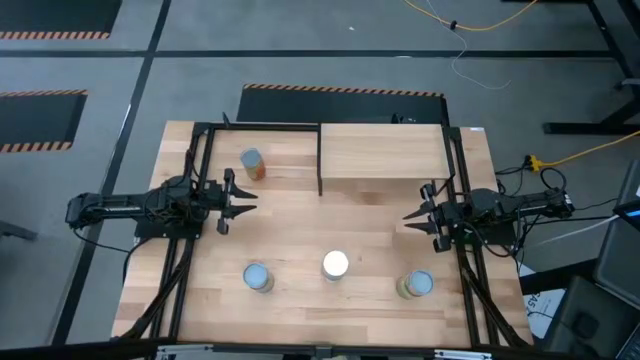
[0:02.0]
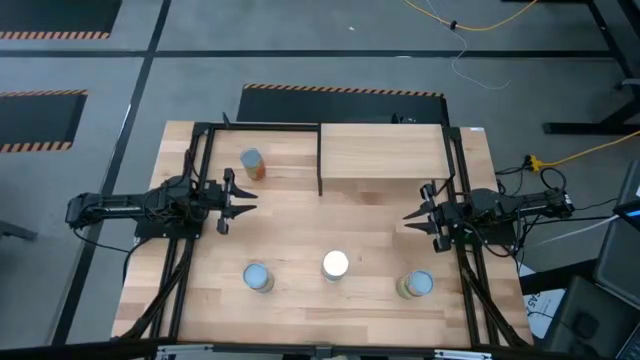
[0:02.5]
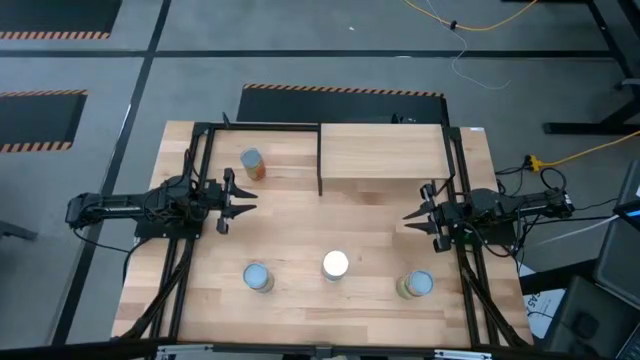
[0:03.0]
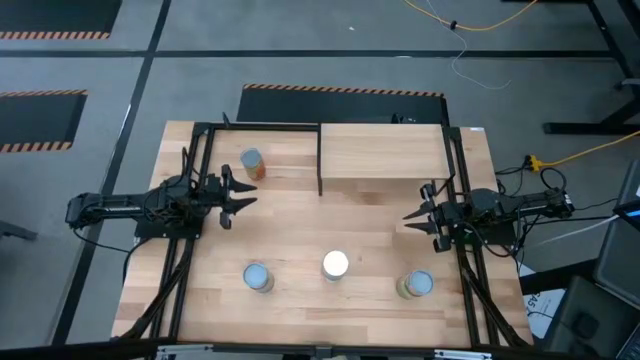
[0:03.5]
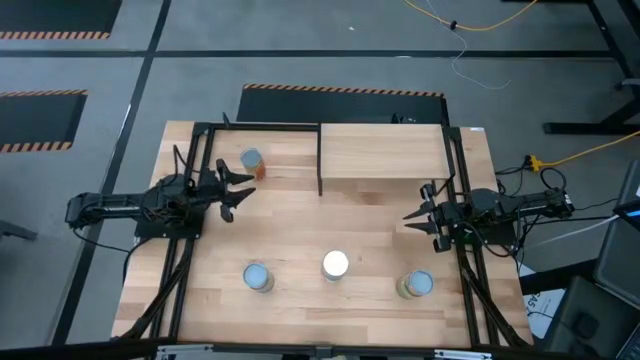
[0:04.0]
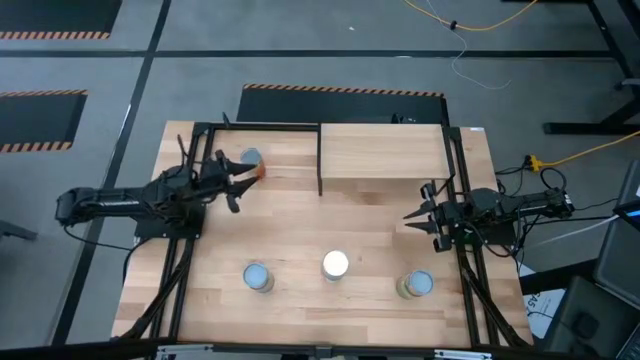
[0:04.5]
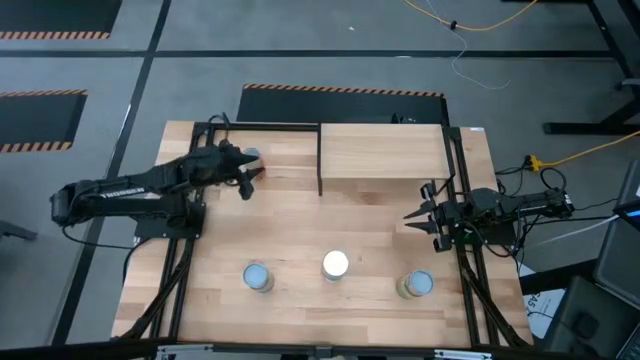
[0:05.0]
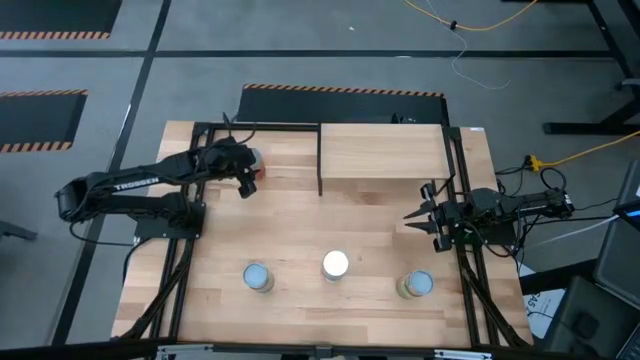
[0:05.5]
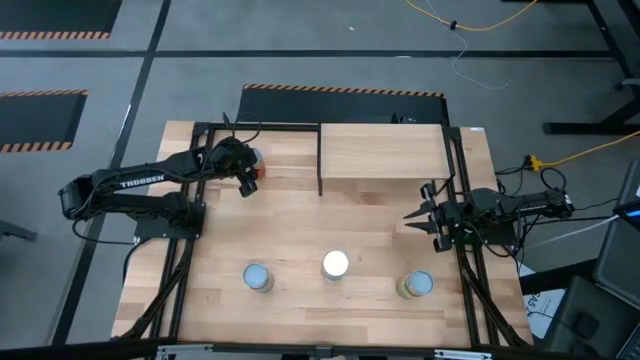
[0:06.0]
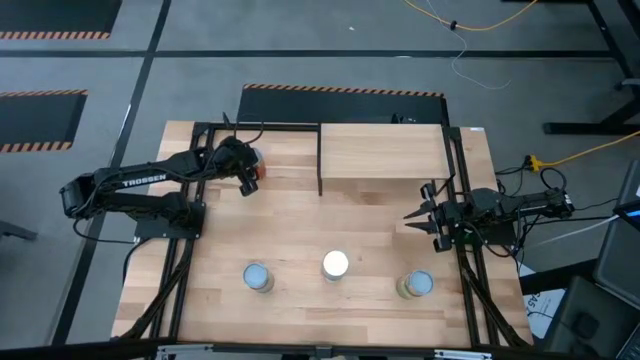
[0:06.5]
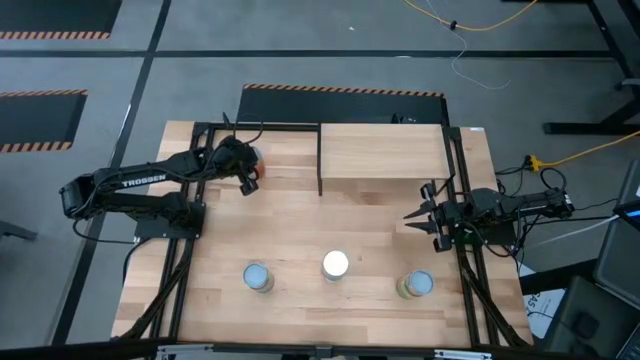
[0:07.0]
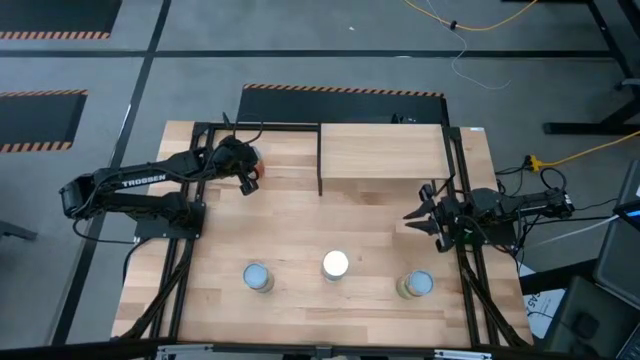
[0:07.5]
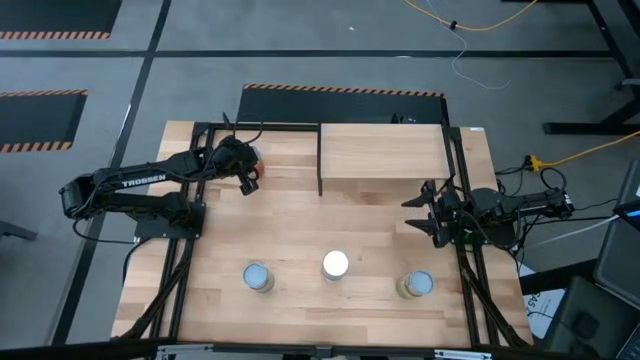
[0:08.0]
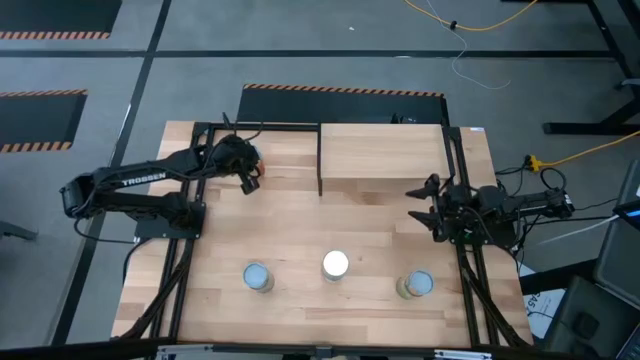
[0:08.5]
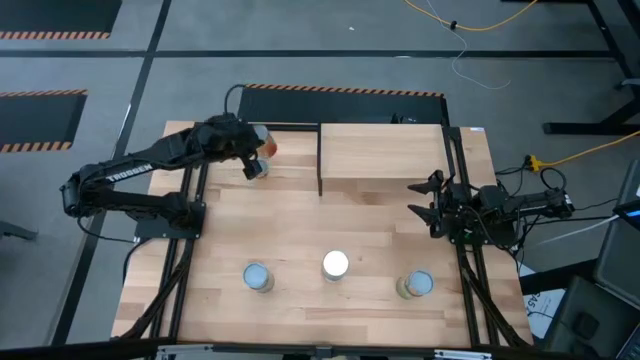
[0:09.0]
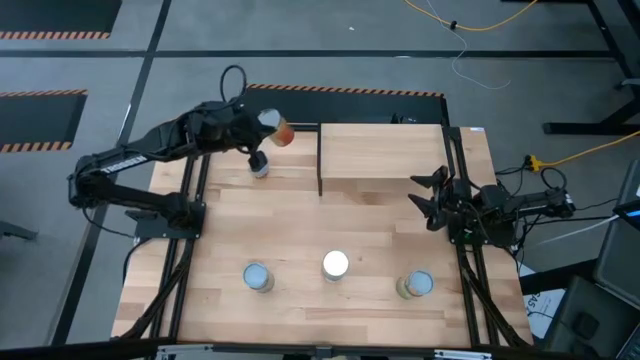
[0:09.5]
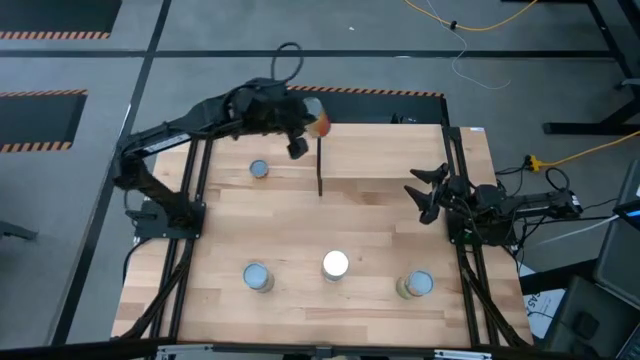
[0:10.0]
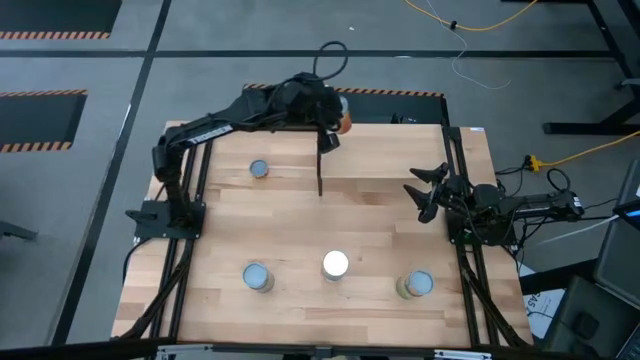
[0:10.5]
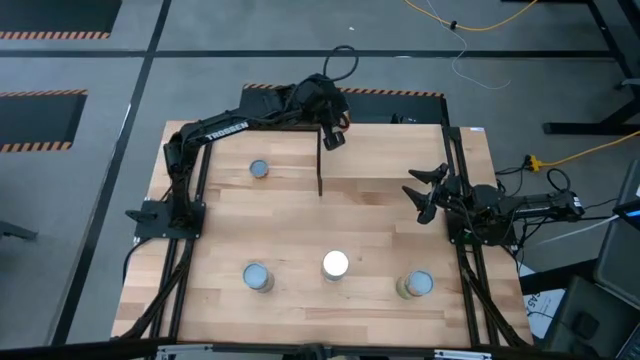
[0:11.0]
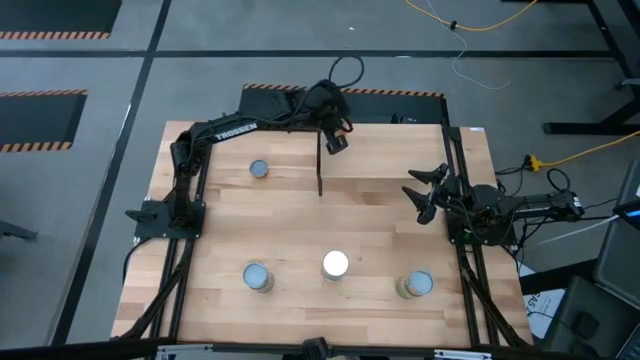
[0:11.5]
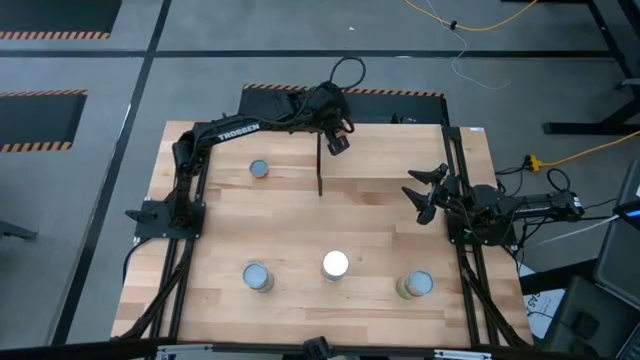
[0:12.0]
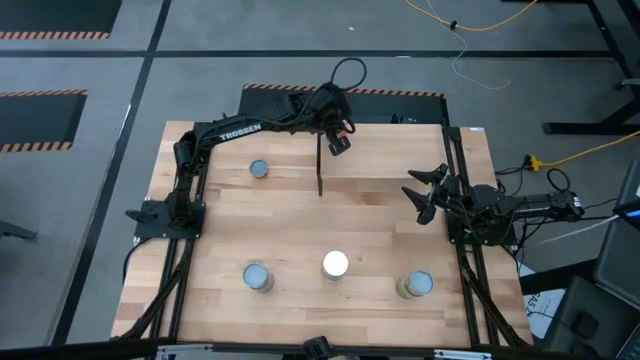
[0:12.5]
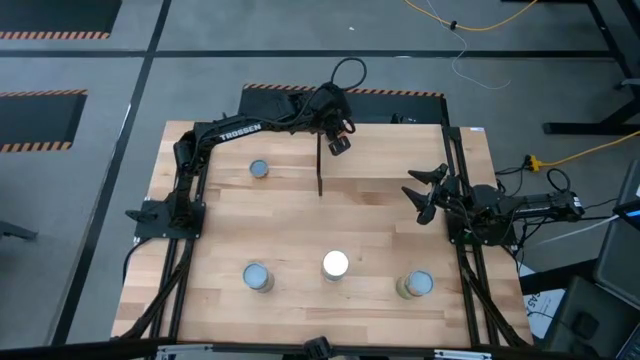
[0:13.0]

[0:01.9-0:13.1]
Task: Pick and place cans onto a shelf
Put the orange canned pineapple on the shelf

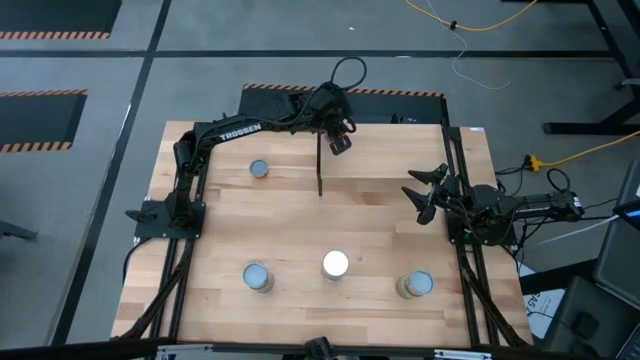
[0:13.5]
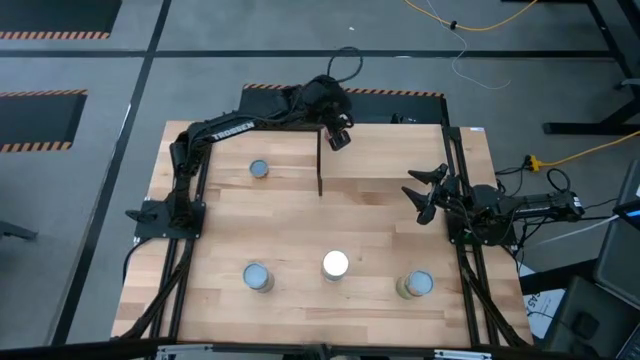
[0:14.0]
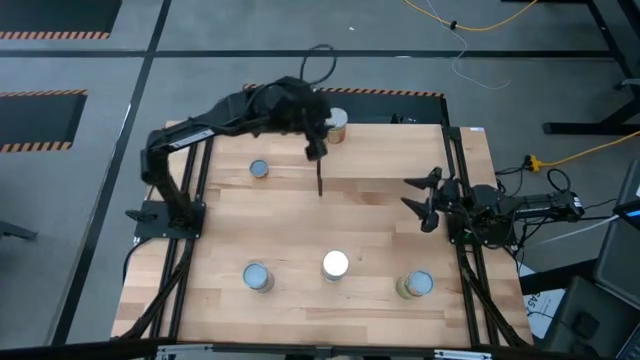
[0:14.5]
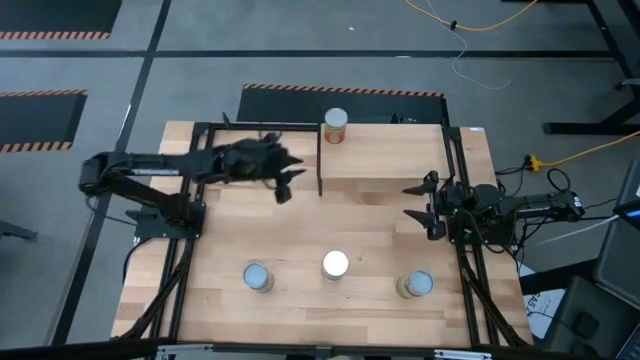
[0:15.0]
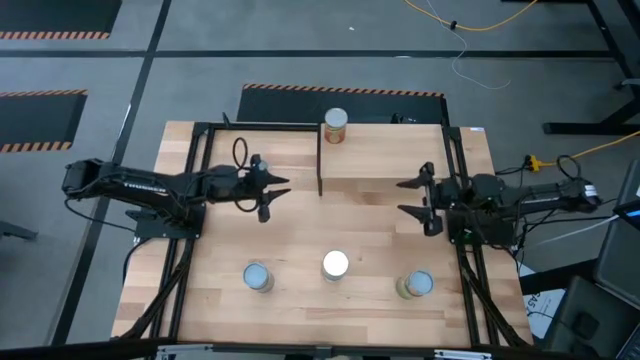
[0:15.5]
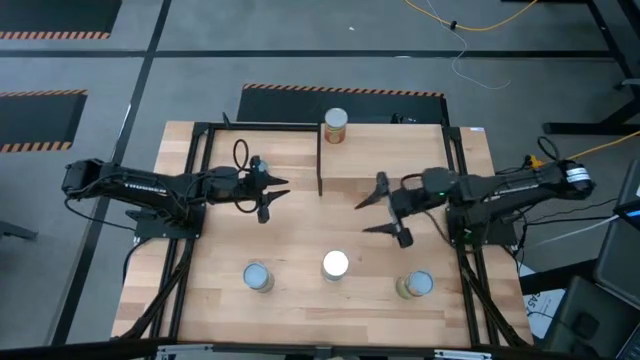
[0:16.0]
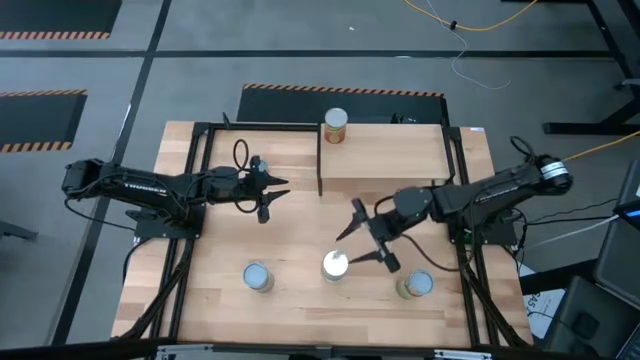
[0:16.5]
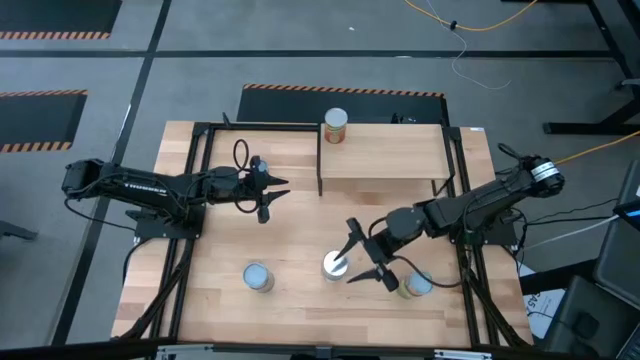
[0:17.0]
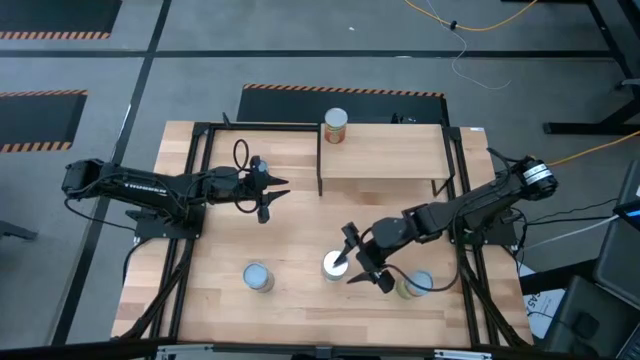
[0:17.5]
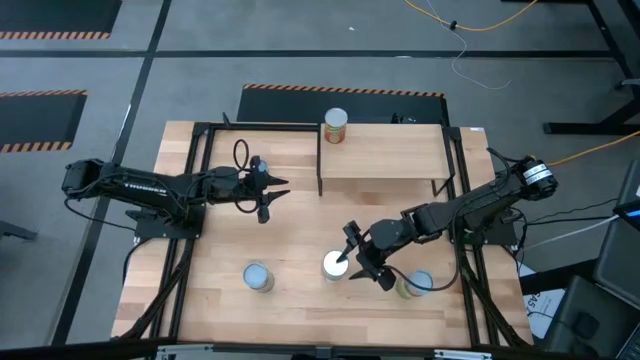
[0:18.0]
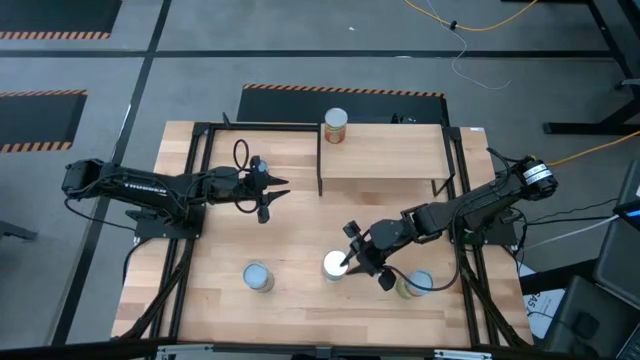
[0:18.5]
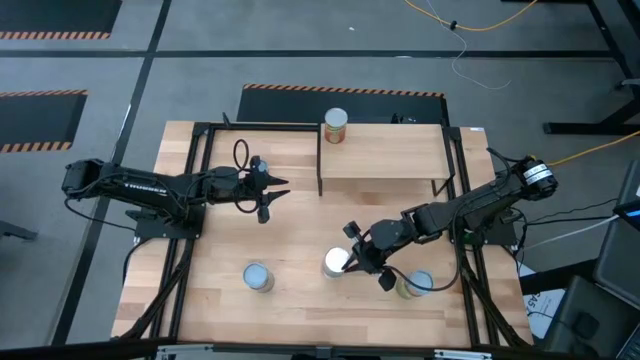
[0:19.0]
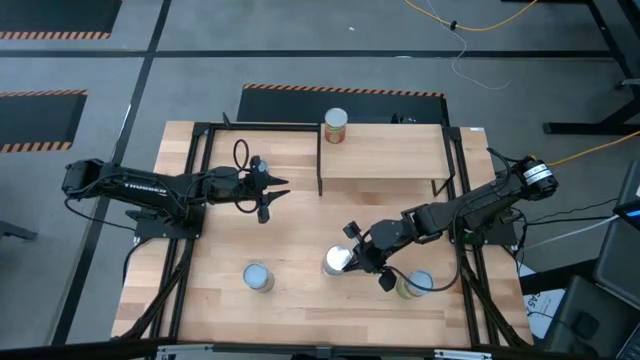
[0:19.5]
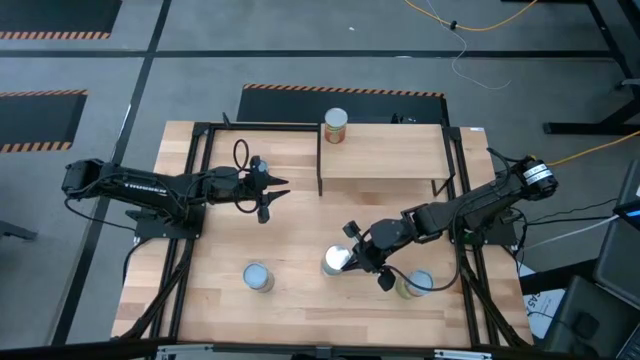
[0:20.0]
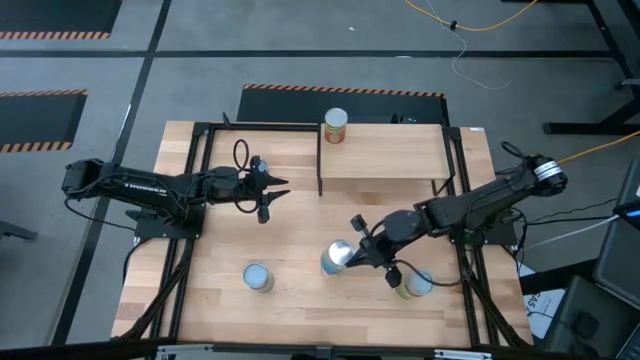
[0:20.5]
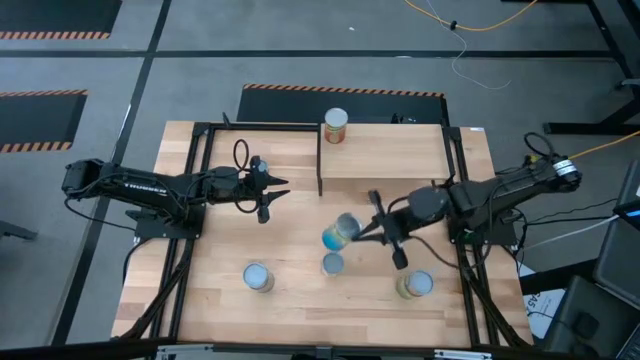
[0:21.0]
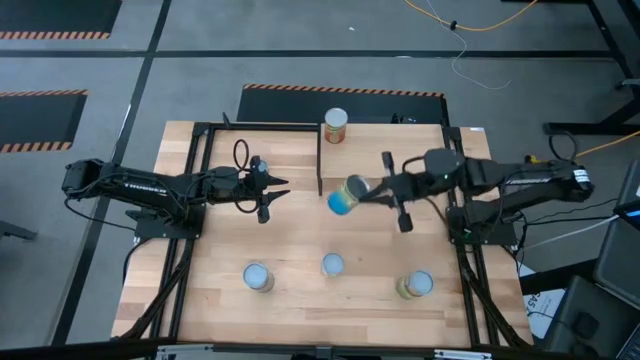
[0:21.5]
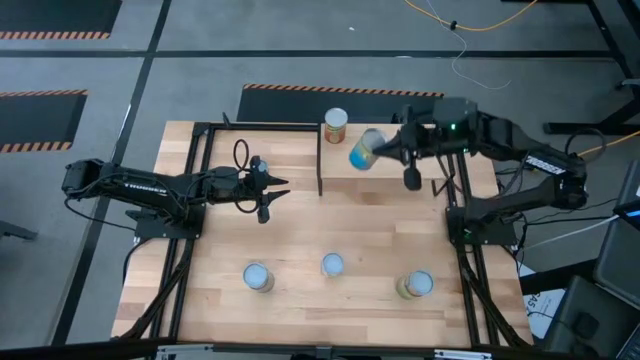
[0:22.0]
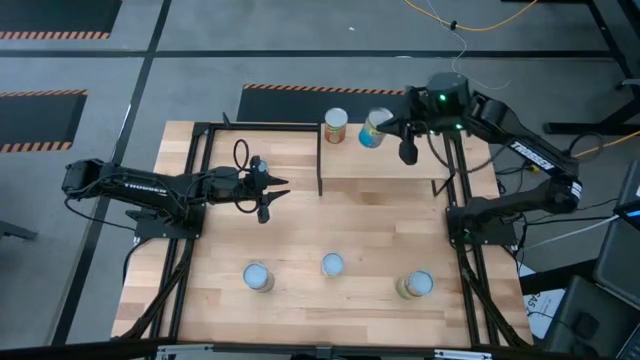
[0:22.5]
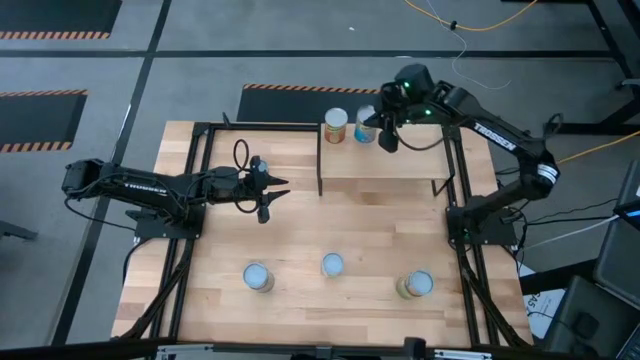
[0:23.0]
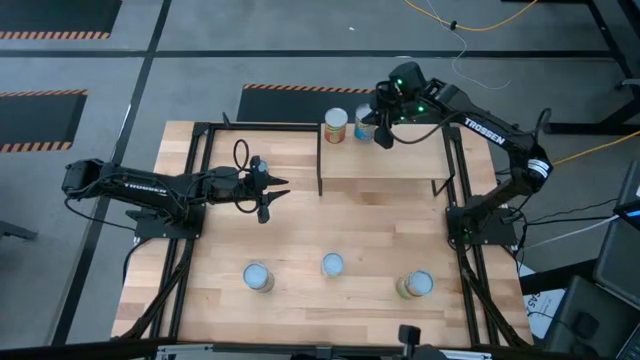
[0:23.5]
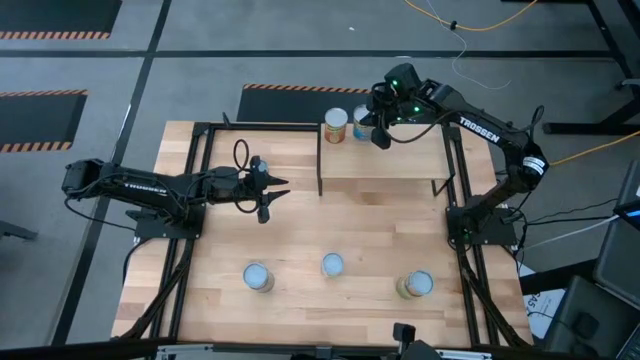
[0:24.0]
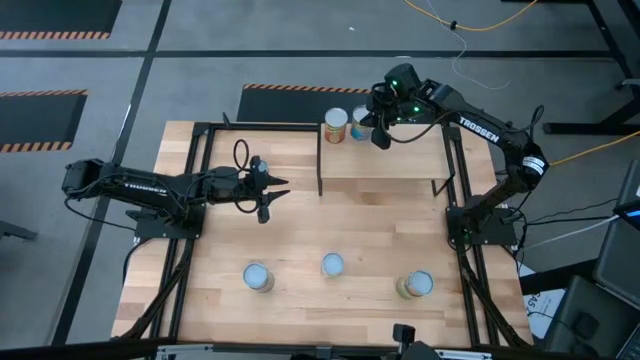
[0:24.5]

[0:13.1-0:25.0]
Put the blue canned cherries on the shelf
